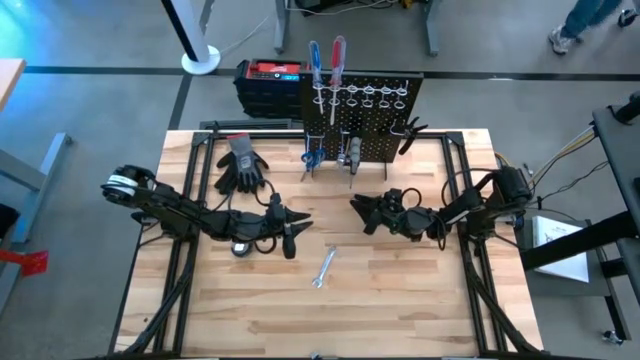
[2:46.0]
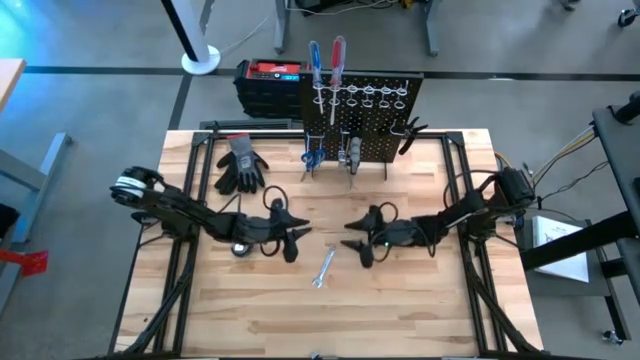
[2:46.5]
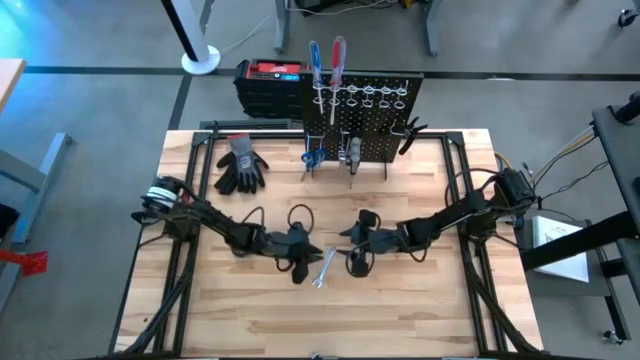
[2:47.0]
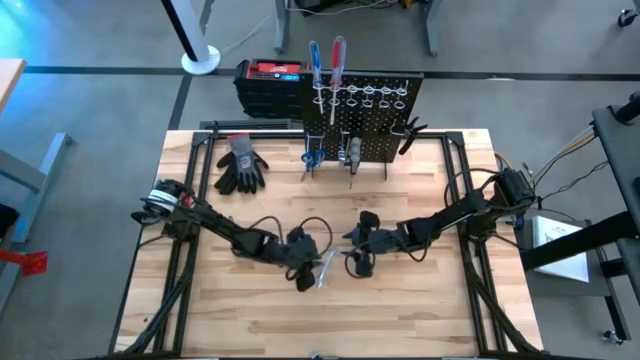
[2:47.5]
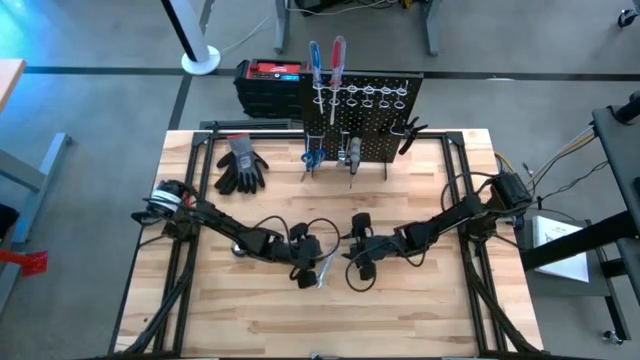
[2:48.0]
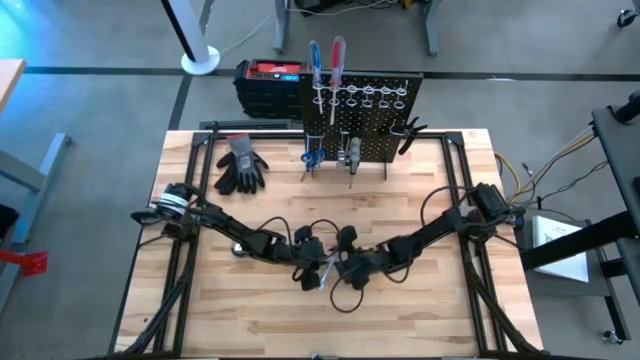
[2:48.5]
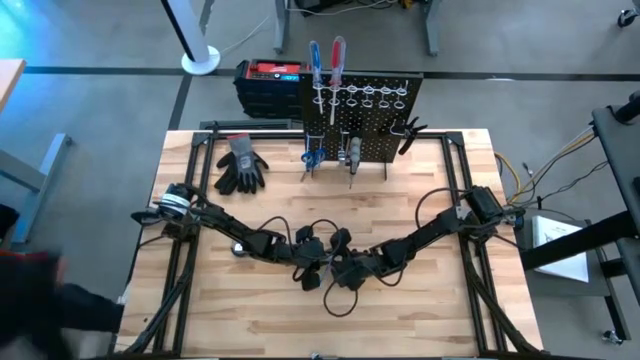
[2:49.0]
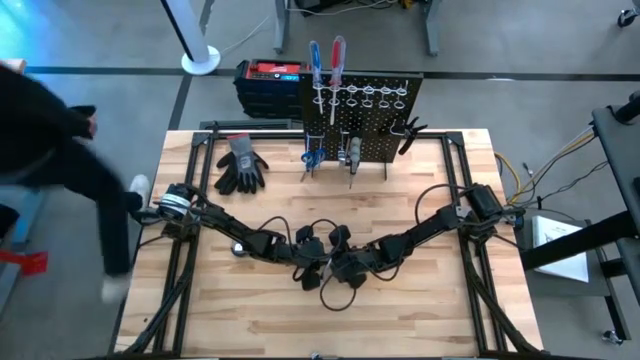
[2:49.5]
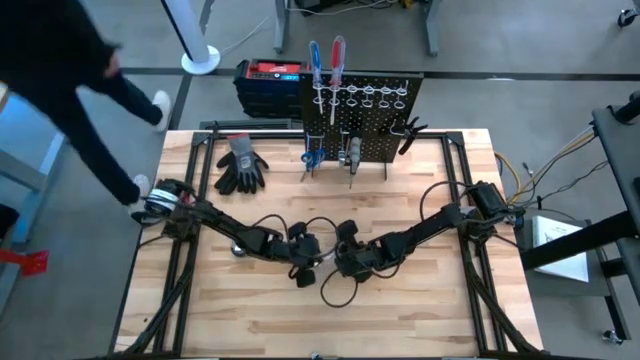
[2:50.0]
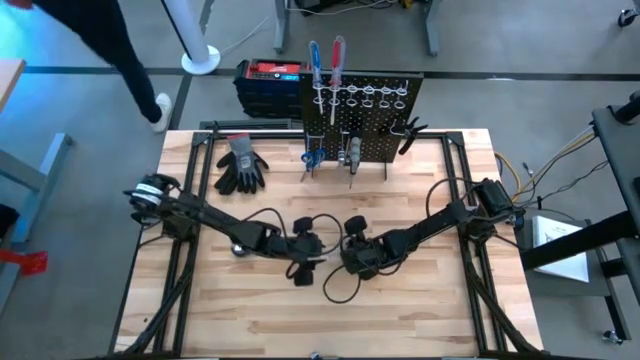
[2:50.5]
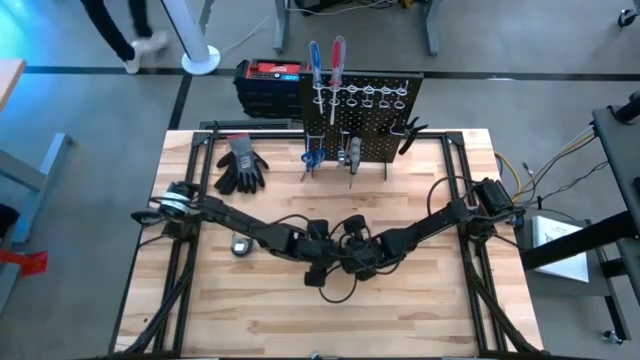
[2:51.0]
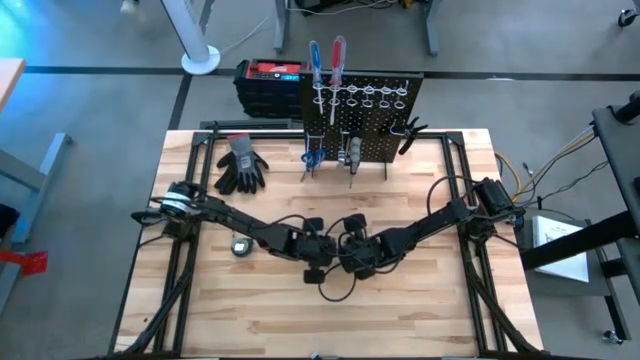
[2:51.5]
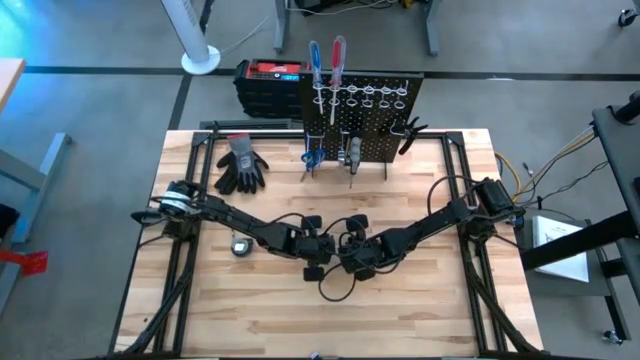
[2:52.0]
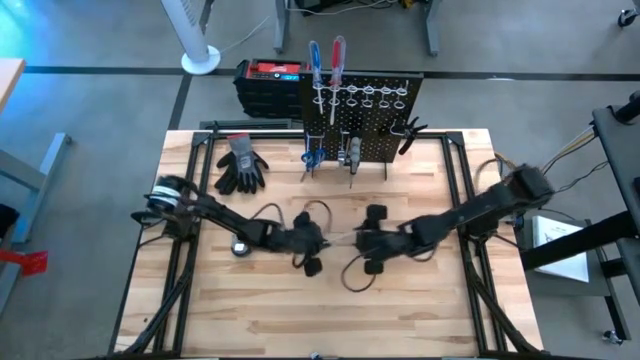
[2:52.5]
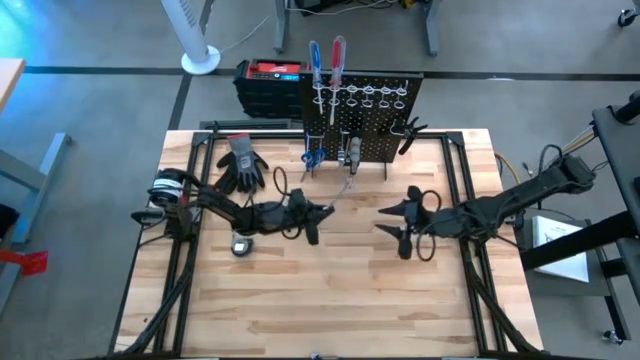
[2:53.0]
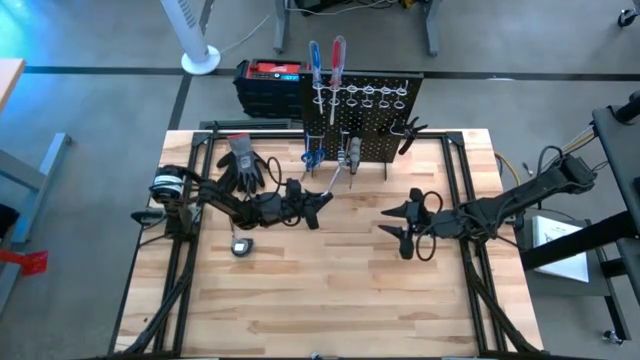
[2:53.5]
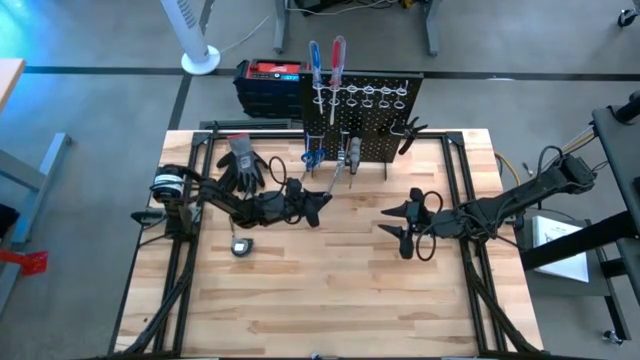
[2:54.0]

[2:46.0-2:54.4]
Task: Hang tools onto peg board
Hang the right silver wrench on the peg board

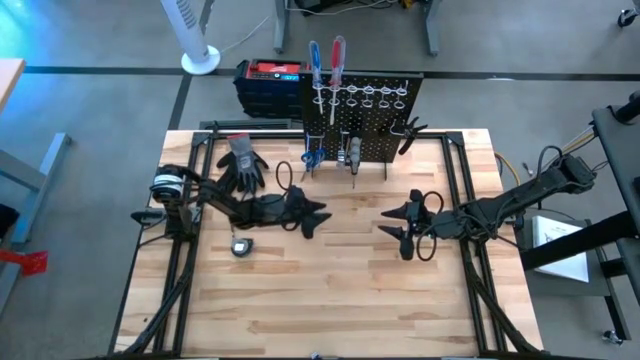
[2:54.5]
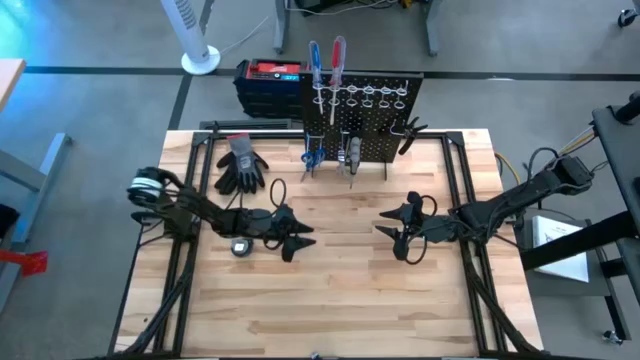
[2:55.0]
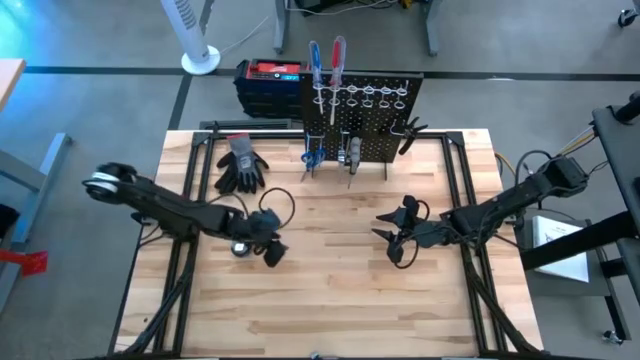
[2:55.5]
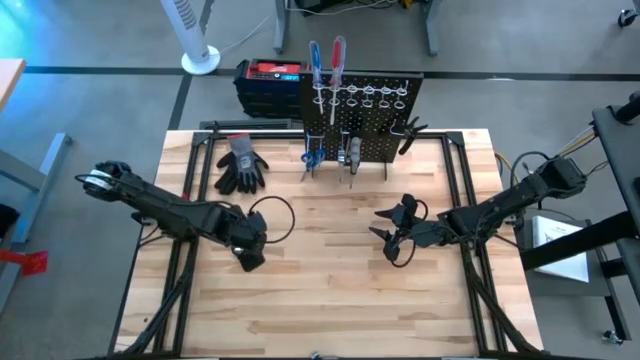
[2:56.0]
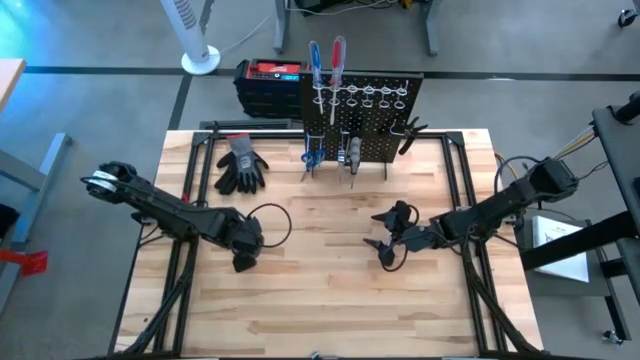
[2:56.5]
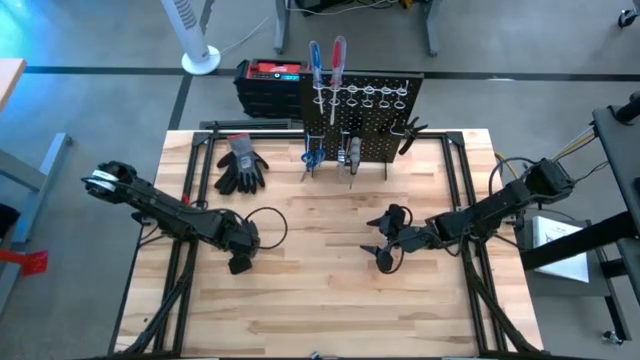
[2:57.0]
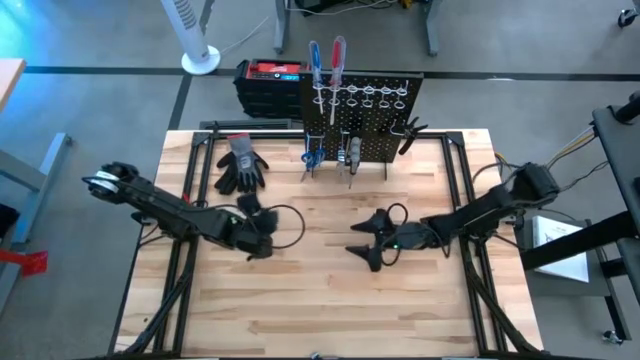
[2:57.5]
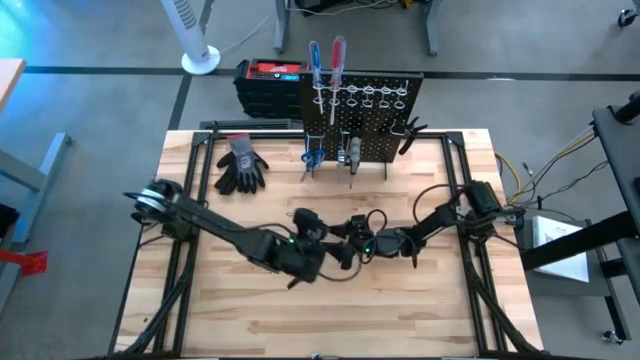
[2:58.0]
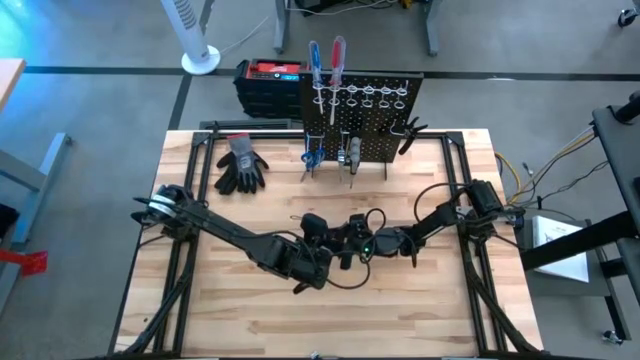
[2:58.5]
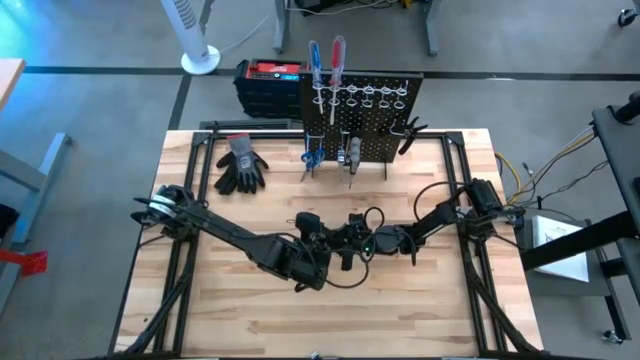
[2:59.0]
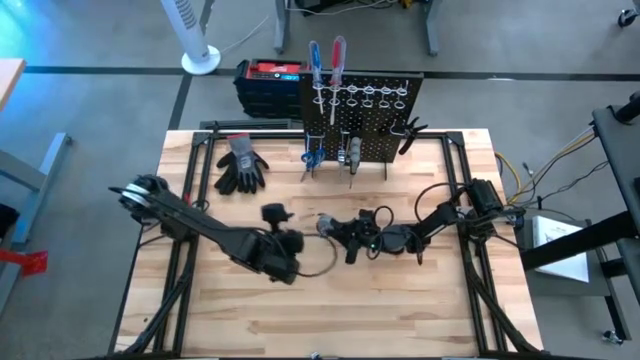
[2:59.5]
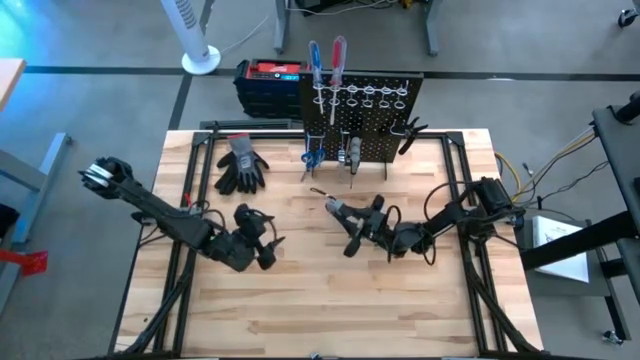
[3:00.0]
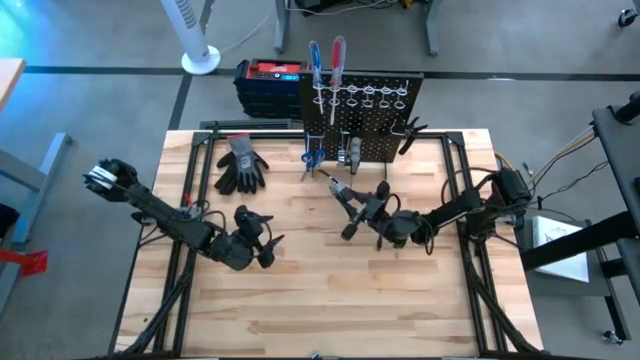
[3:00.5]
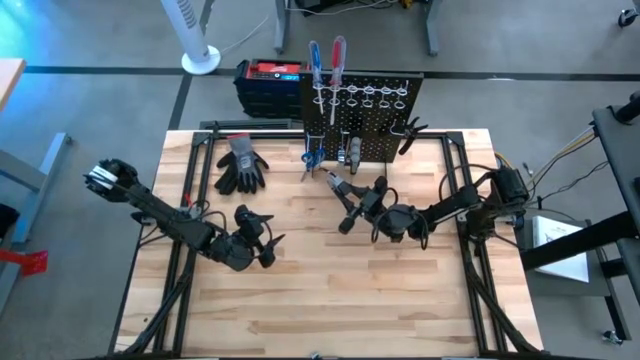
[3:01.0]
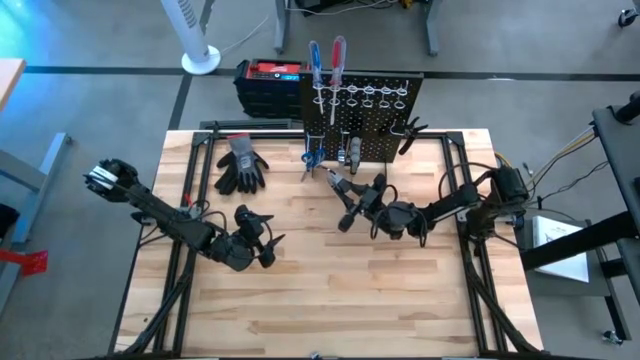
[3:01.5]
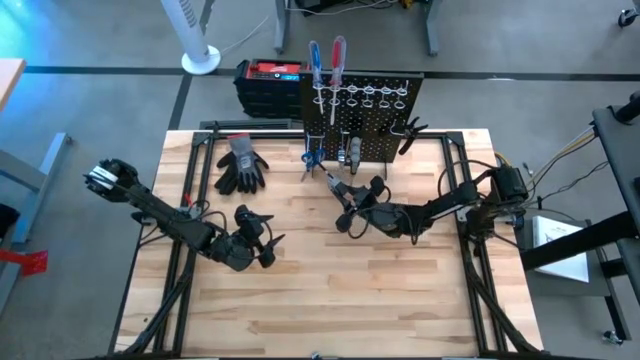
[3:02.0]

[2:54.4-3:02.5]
Hang the right silver wrench on the peg board

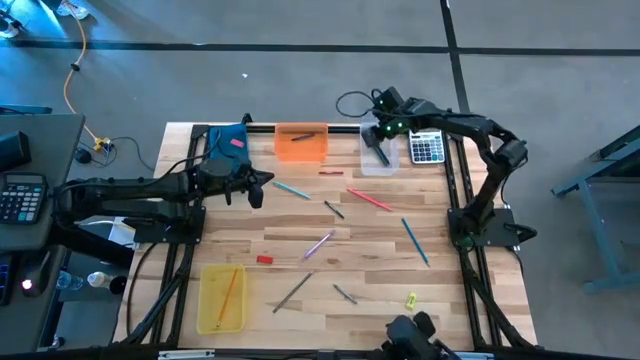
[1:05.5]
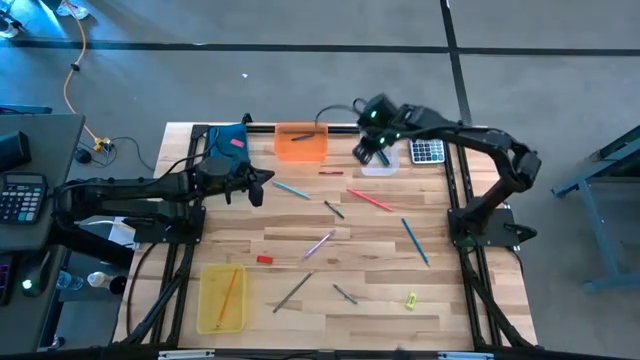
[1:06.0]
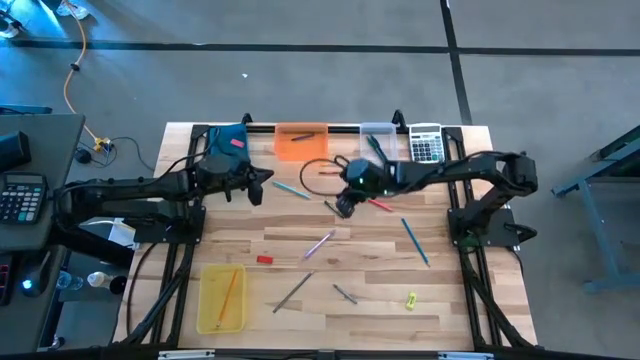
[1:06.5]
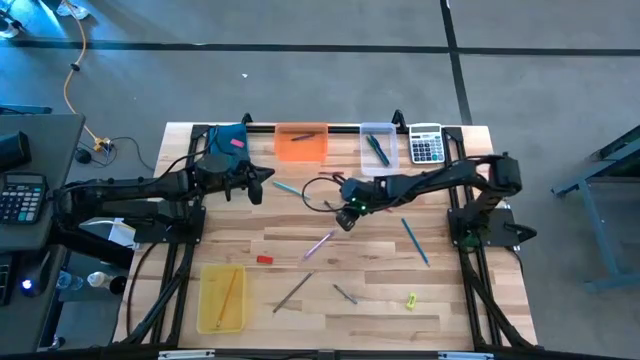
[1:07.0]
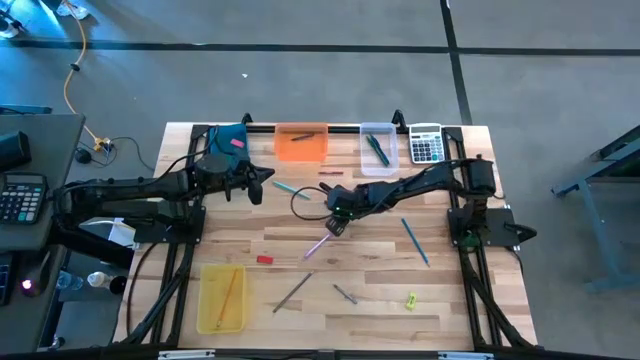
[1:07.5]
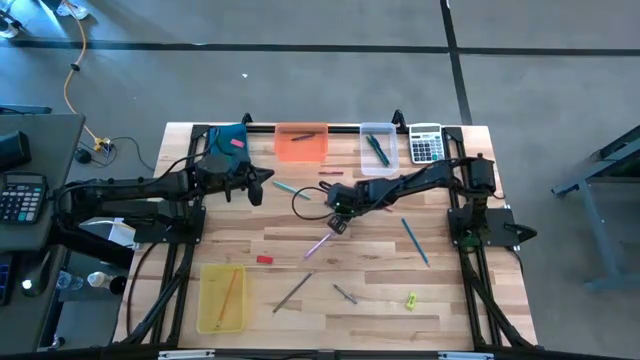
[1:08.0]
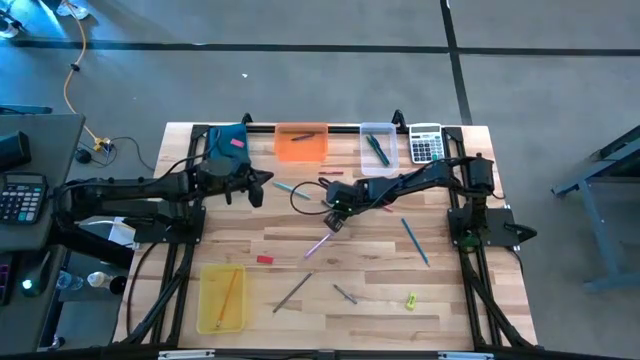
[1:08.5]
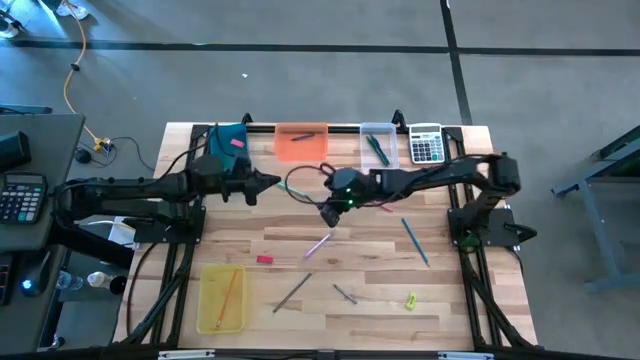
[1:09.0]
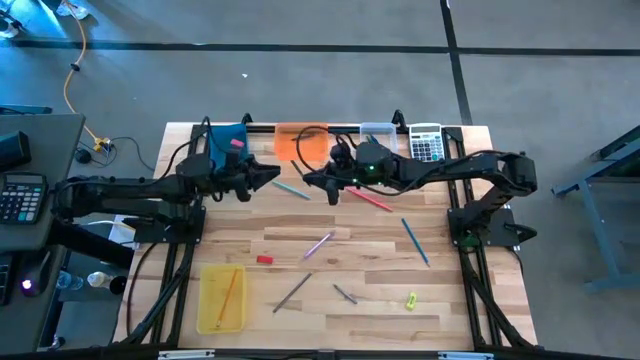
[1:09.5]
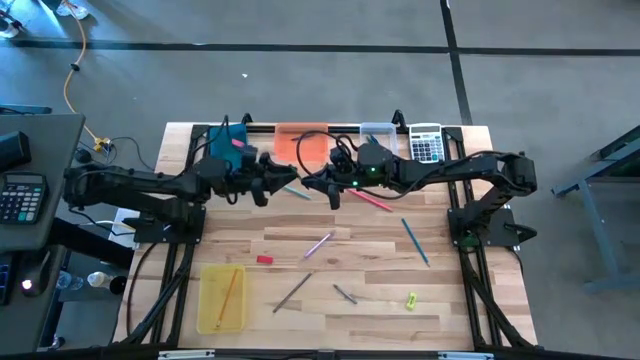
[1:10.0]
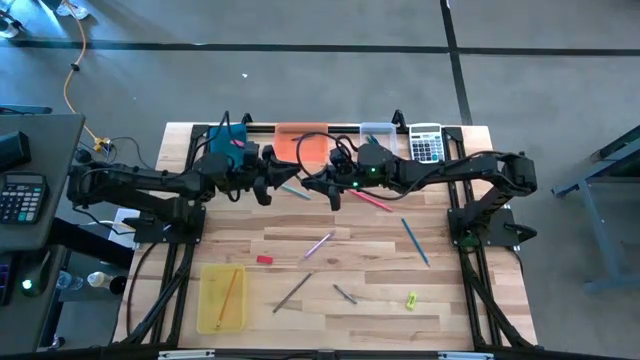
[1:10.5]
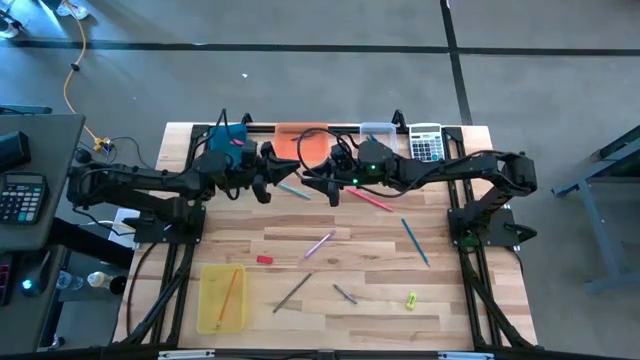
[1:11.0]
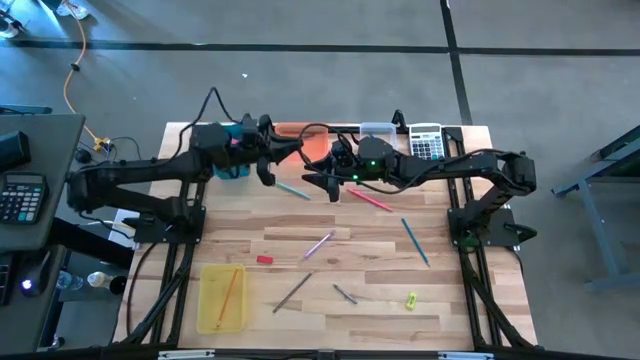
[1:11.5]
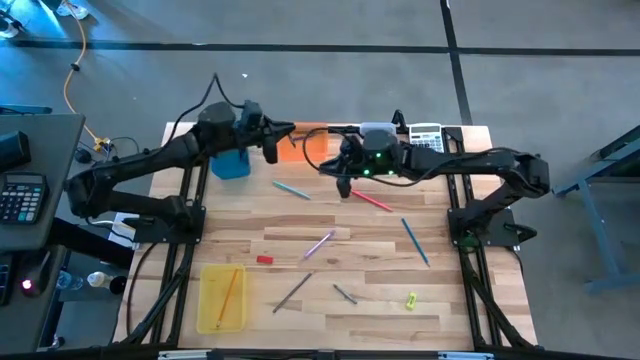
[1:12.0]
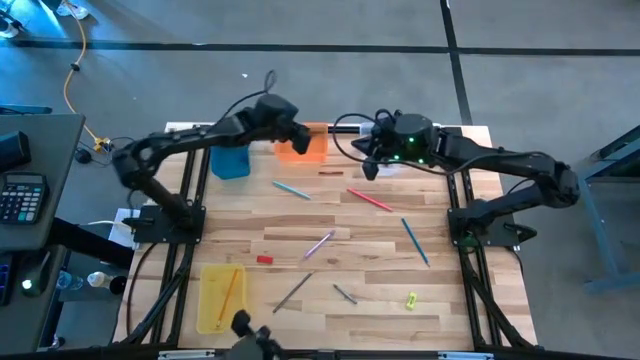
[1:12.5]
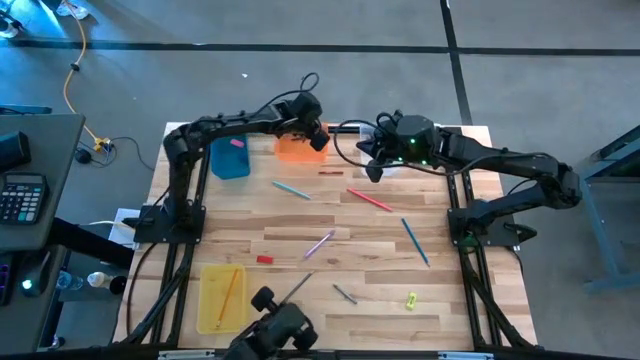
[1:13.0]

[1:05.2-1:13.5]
Task: Sort crayons/erasers/pens/pencils in bins
Put the green crayon into the orange bin
